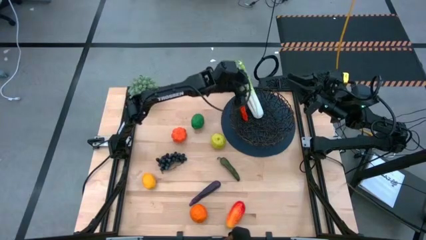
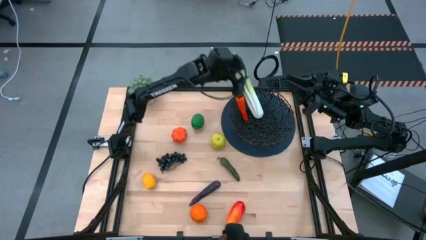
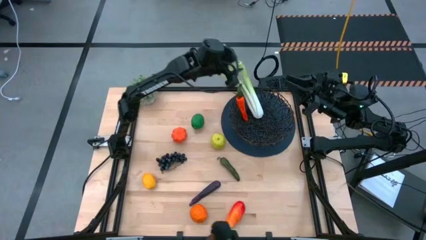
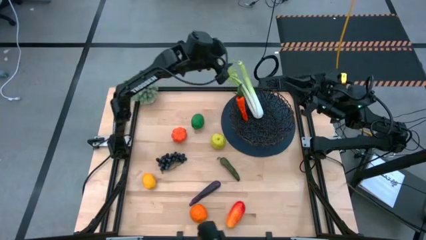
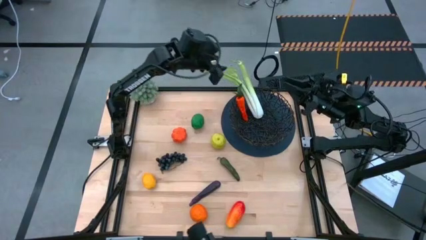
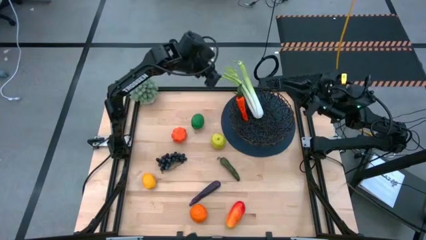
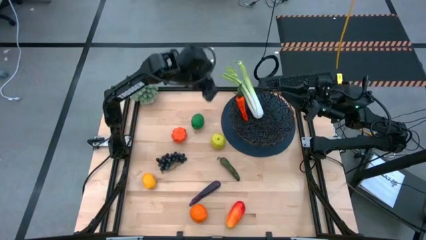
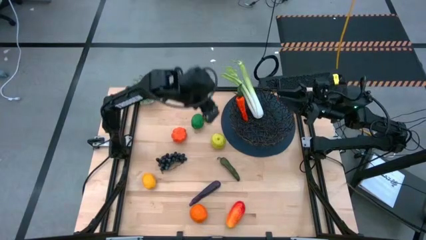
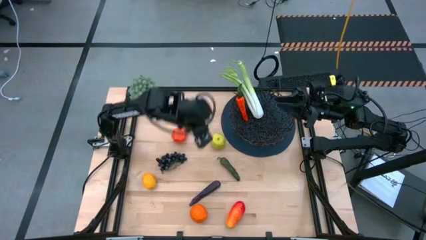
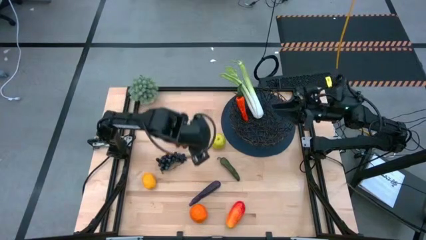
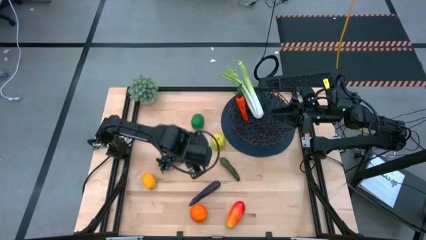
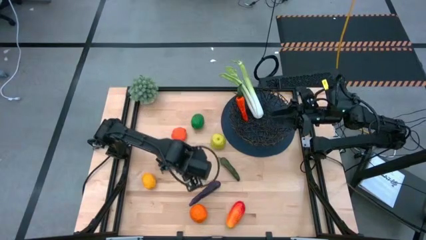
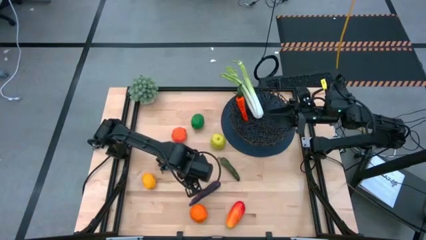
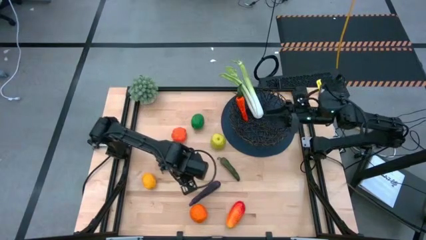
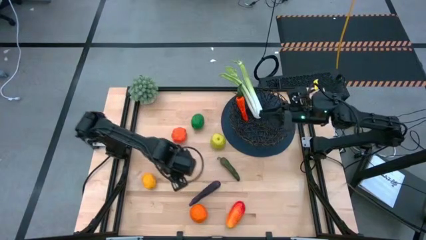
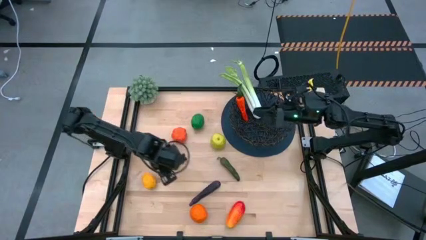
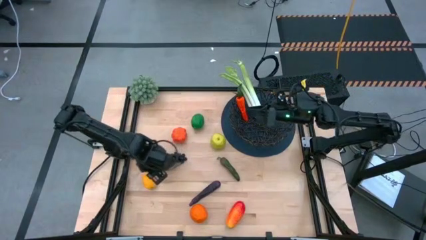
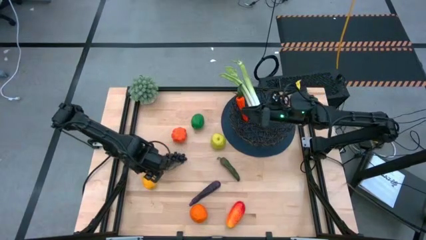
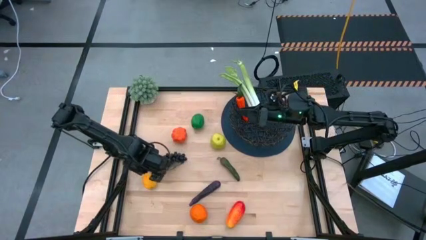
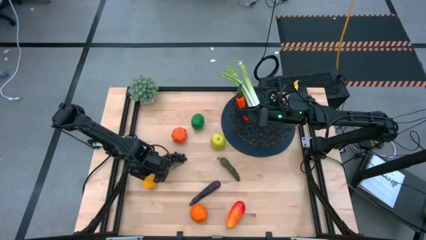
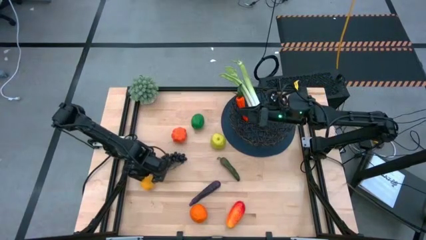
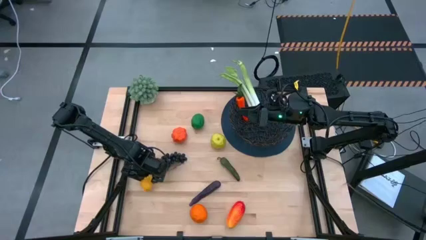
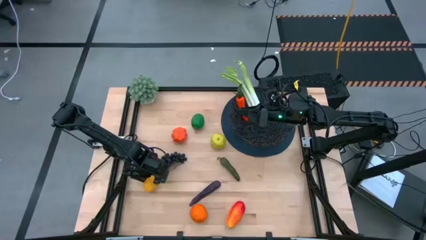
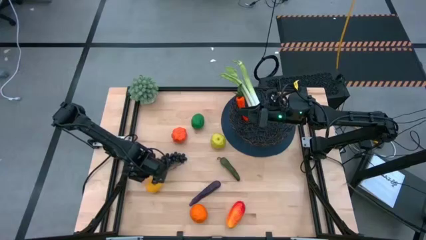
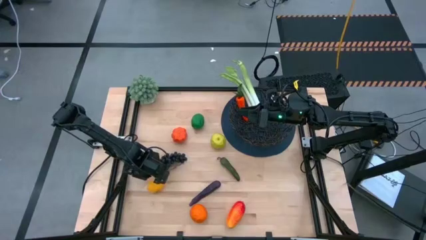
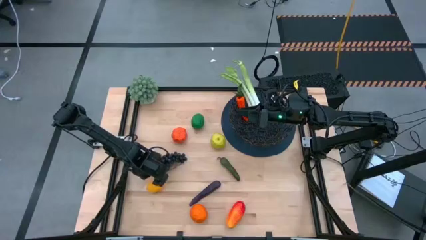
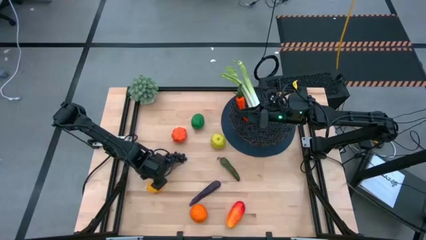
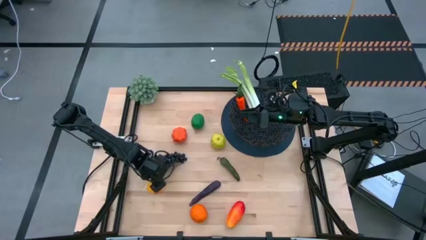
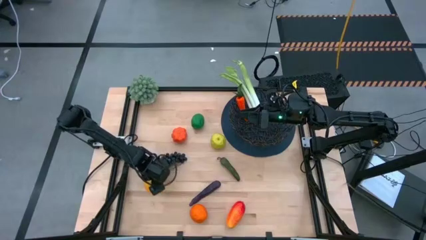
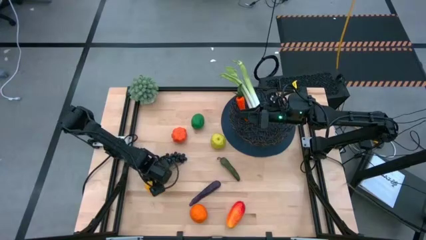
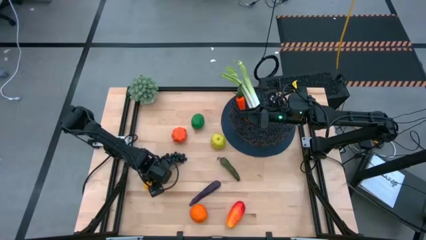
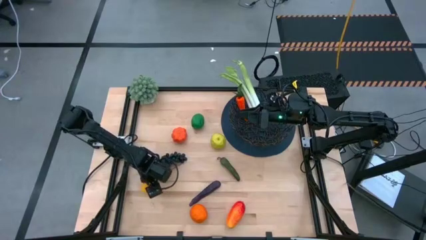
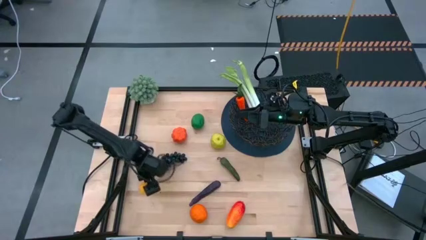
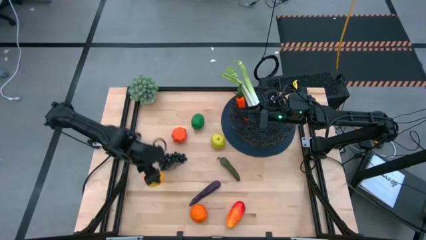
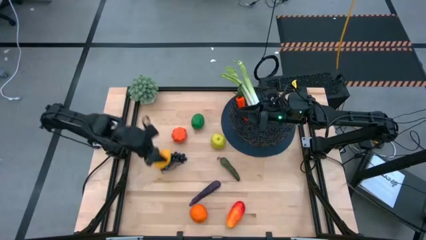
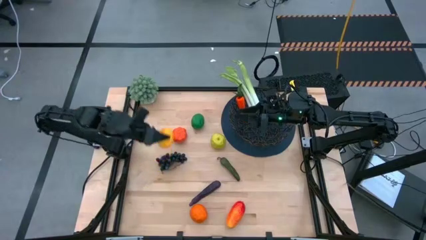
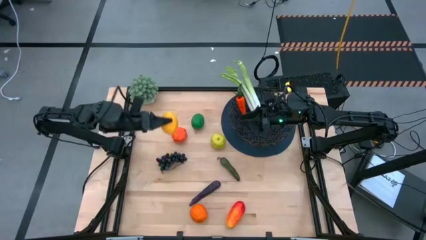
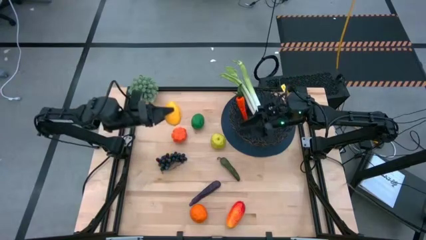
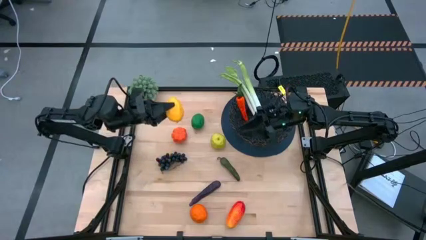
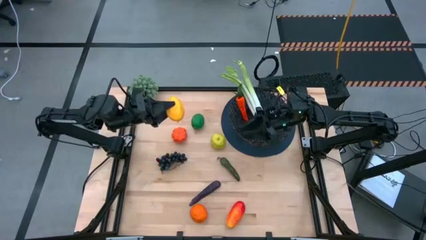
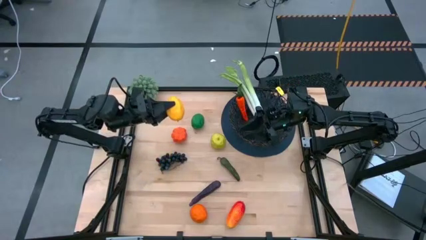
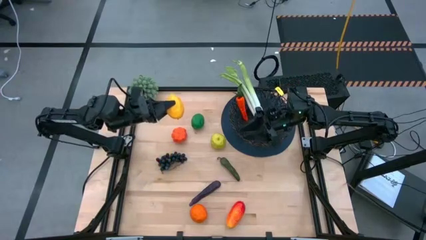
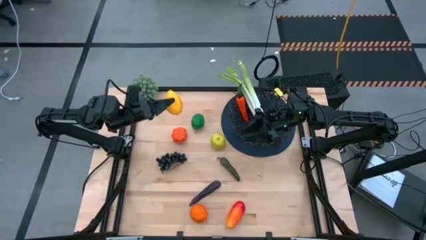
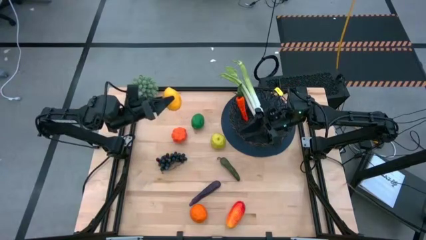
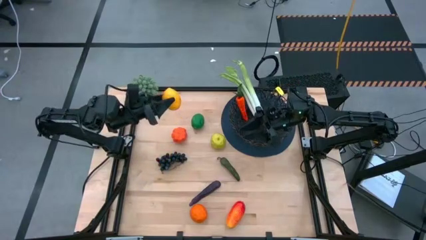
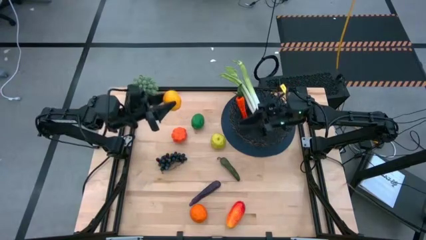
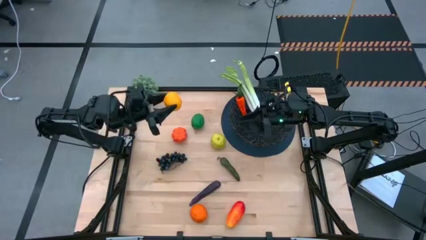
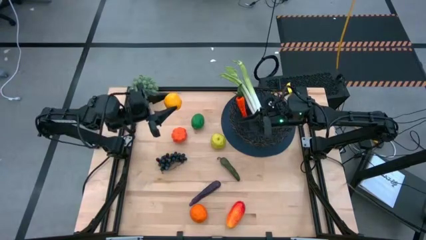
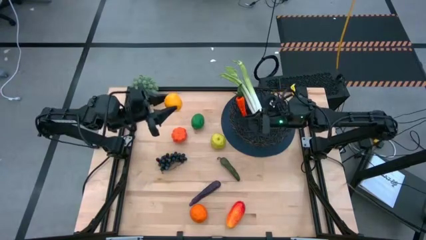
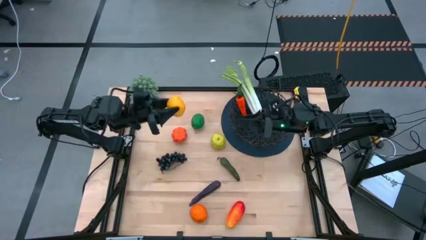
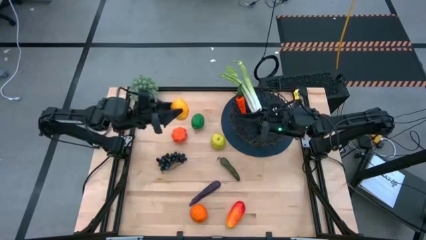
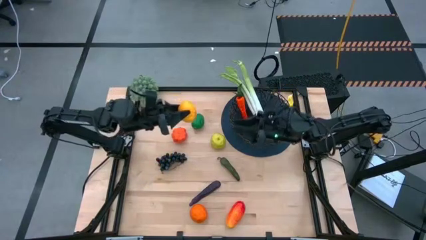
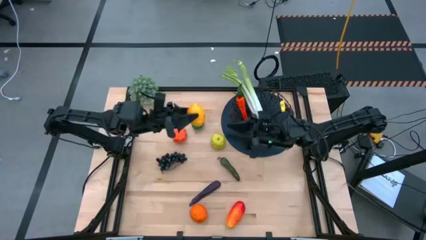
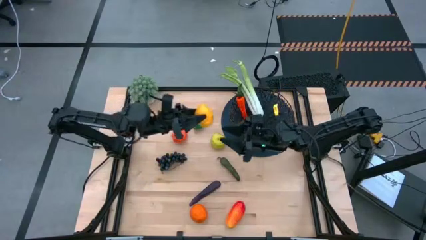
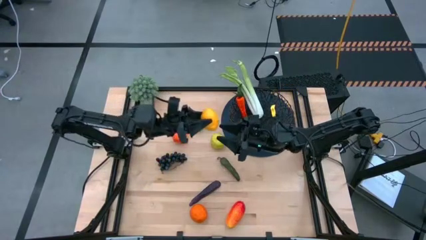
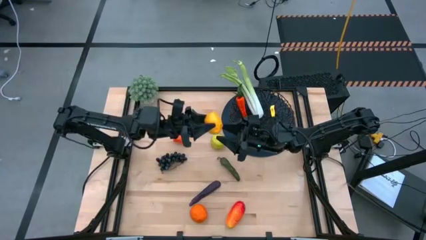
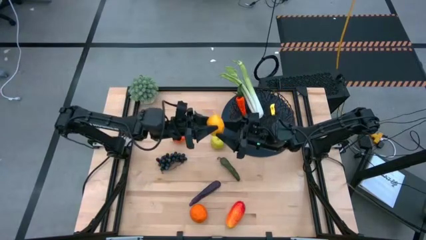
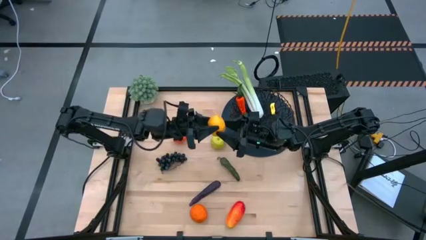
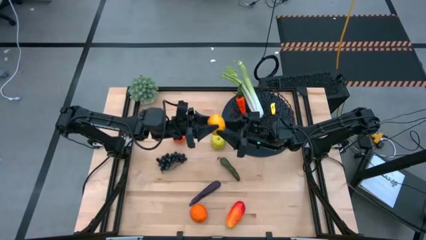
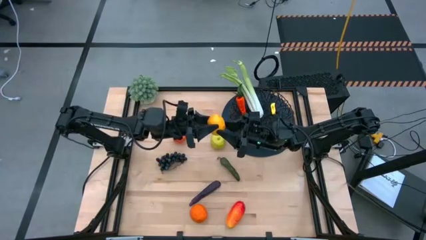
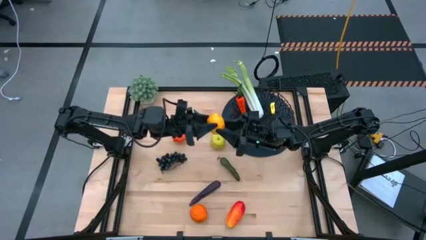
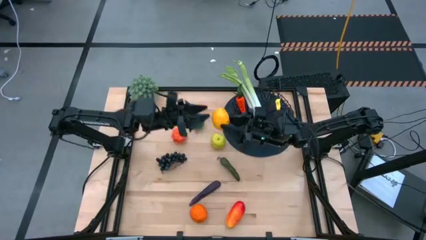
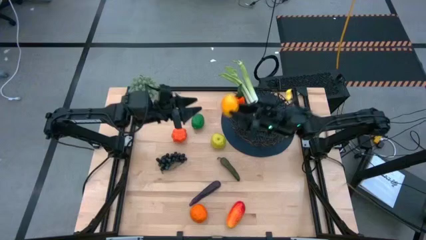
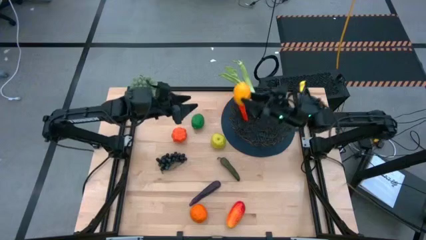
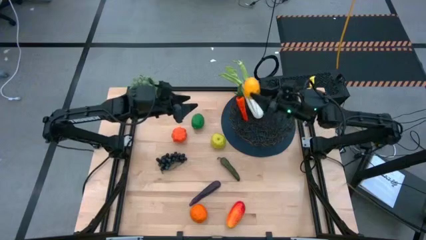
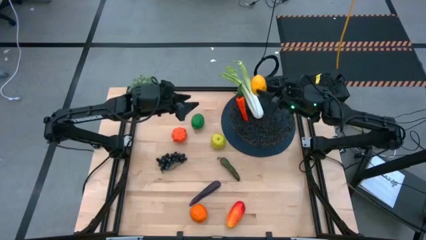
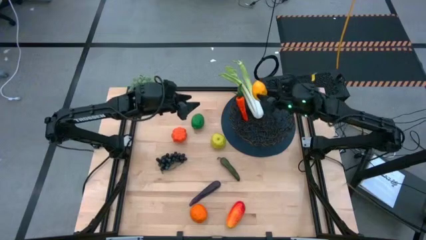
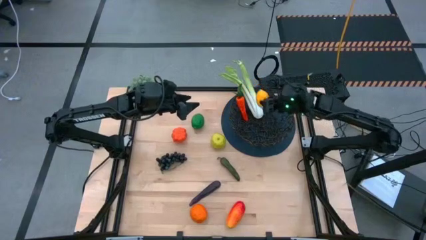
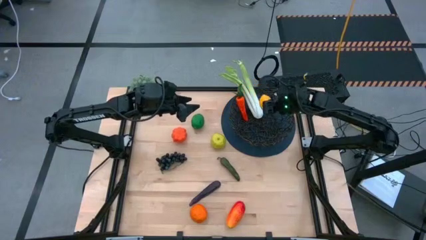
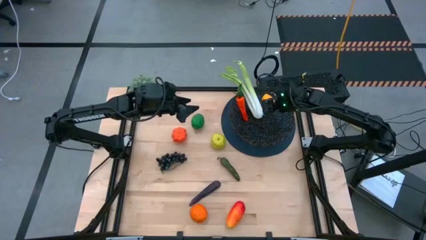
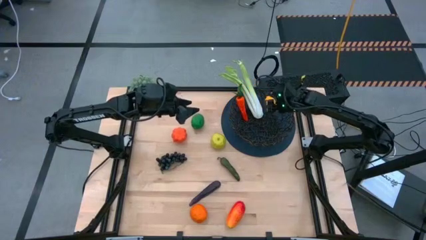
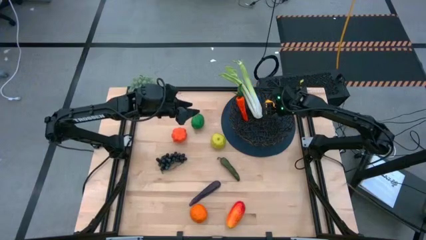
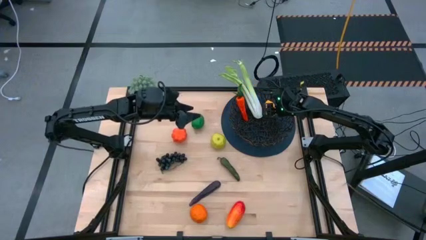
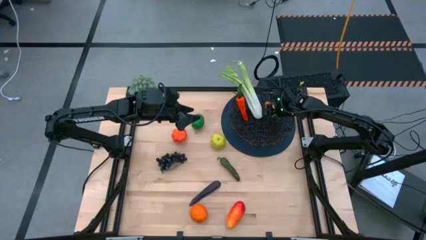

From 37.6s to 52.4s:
Task: Build produce basket
Put the yellow lemon into the black woven basket
